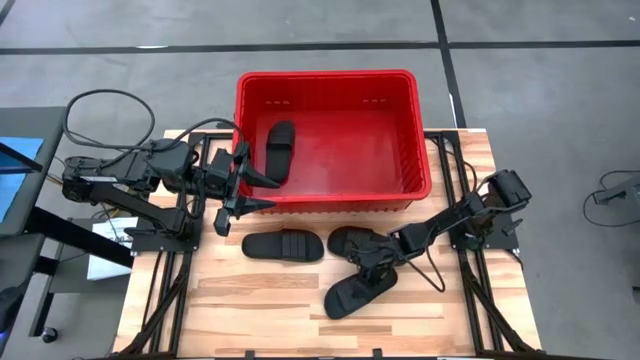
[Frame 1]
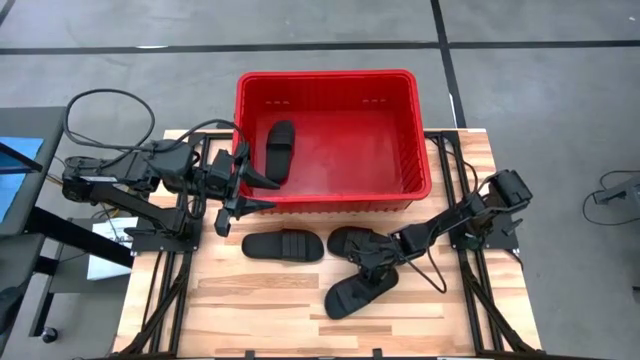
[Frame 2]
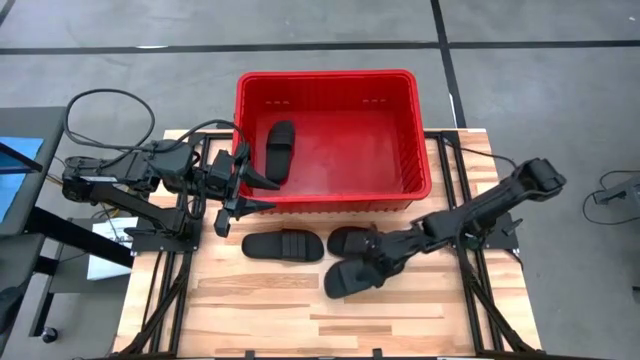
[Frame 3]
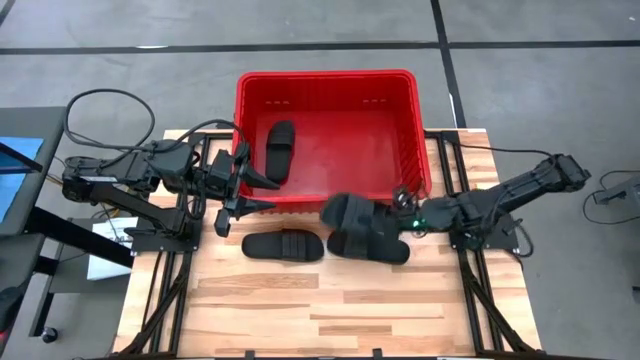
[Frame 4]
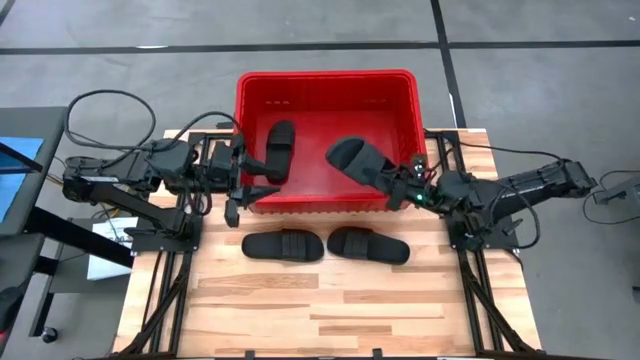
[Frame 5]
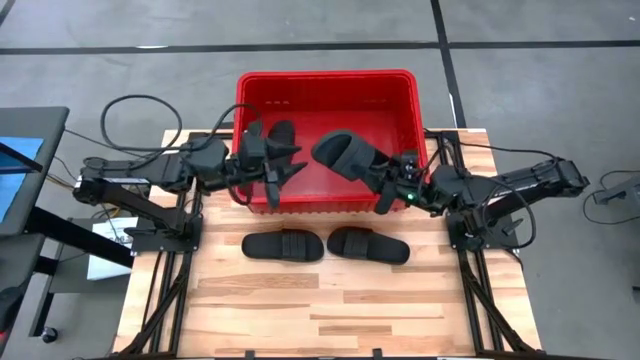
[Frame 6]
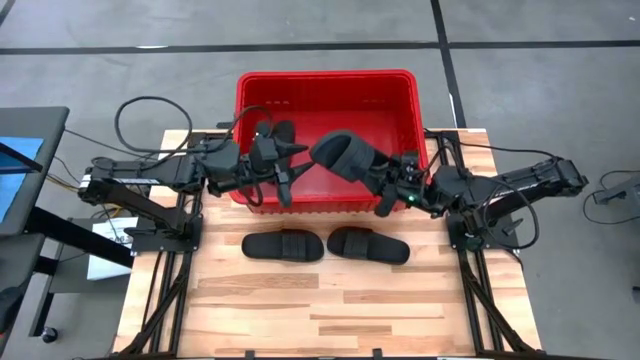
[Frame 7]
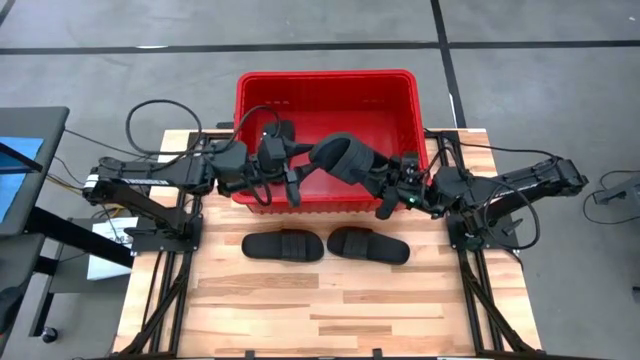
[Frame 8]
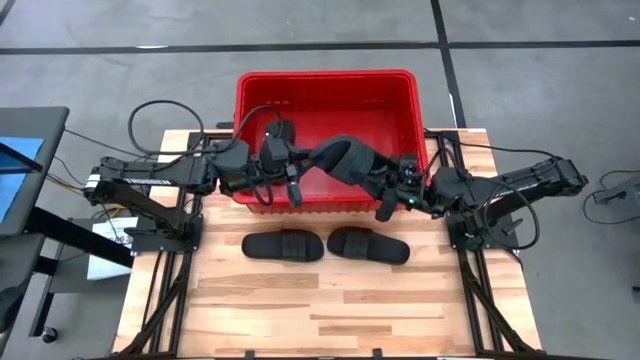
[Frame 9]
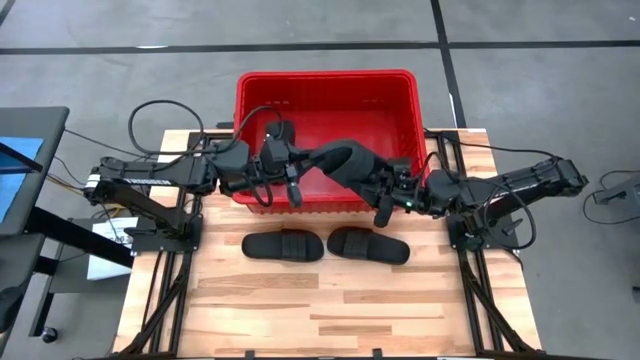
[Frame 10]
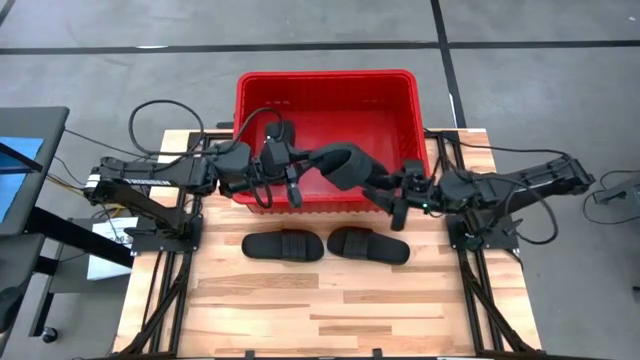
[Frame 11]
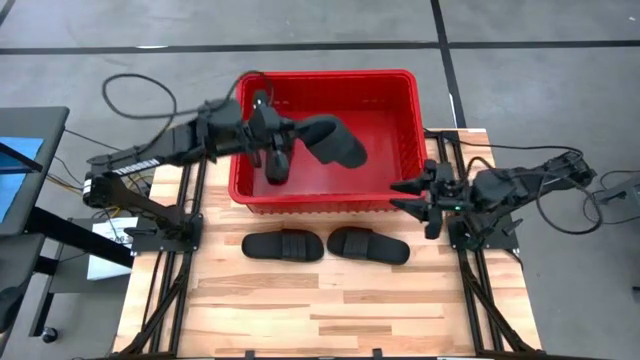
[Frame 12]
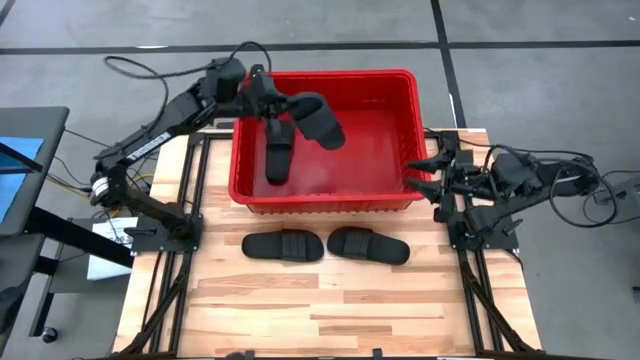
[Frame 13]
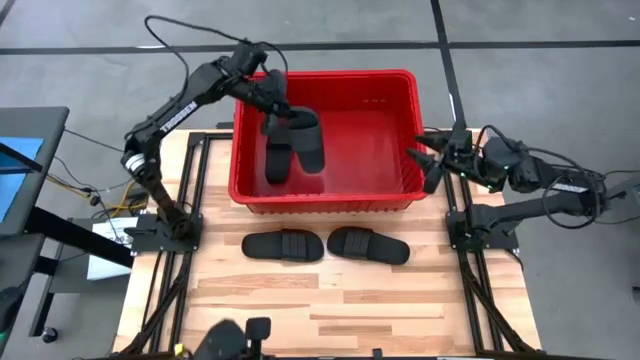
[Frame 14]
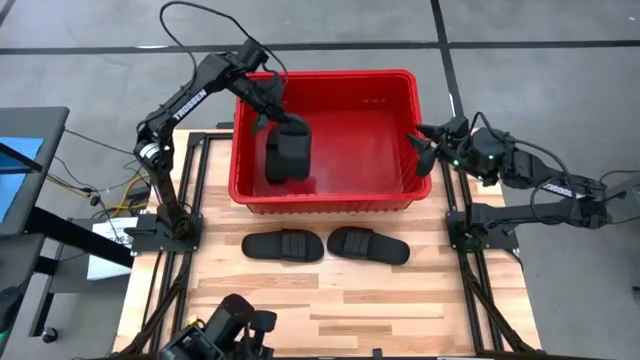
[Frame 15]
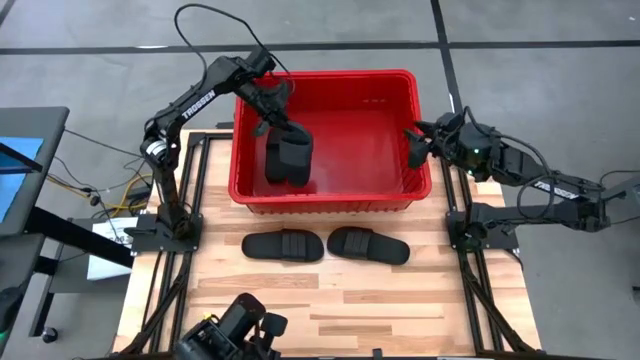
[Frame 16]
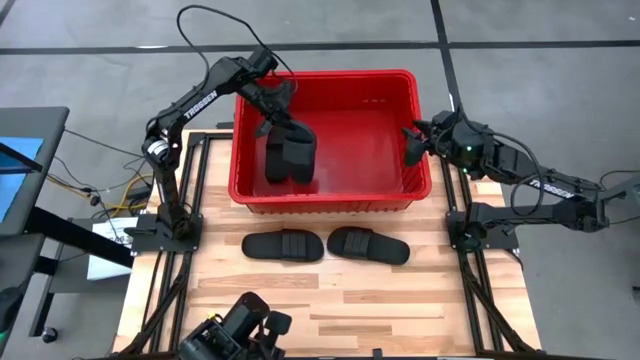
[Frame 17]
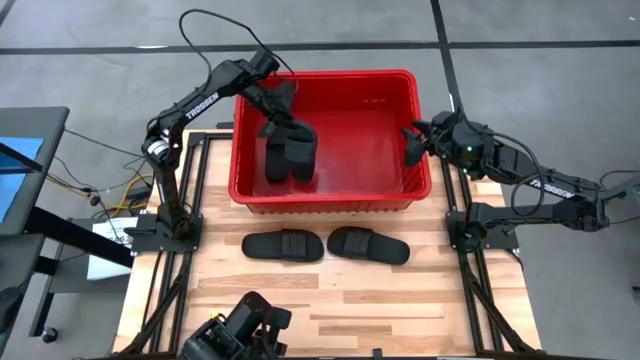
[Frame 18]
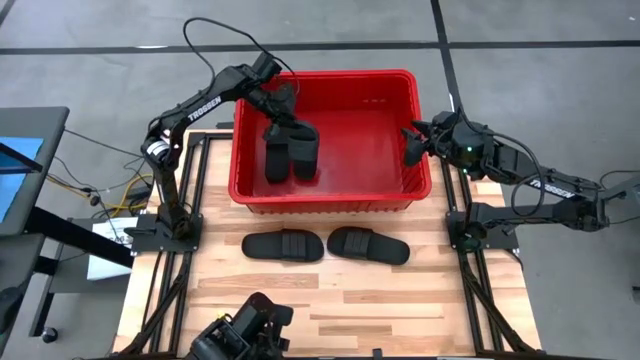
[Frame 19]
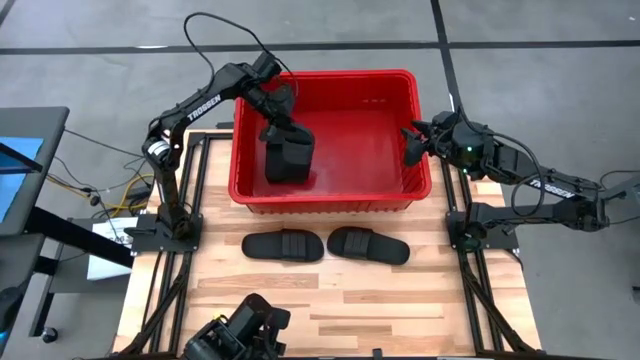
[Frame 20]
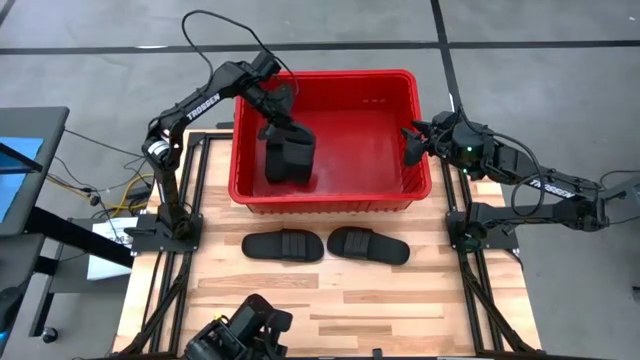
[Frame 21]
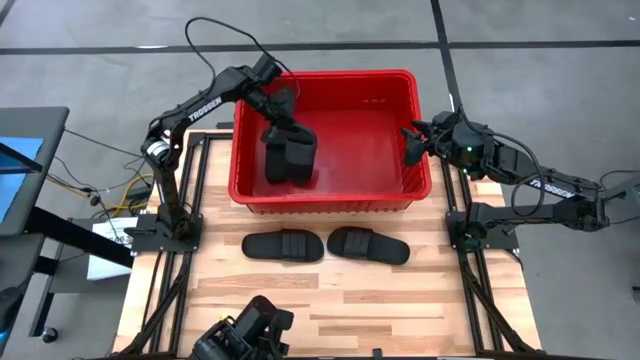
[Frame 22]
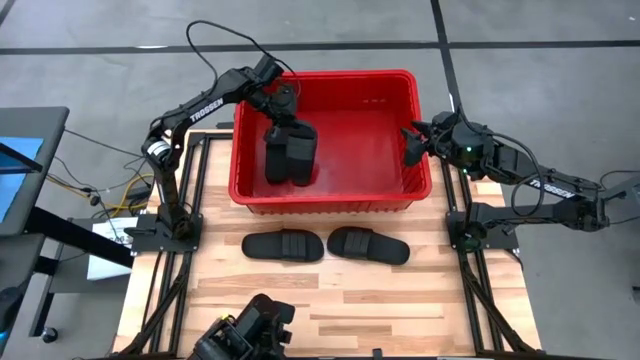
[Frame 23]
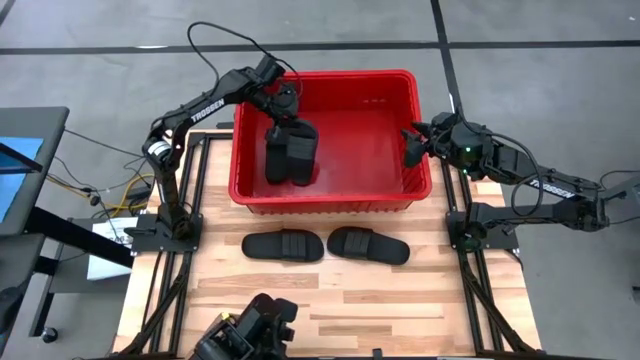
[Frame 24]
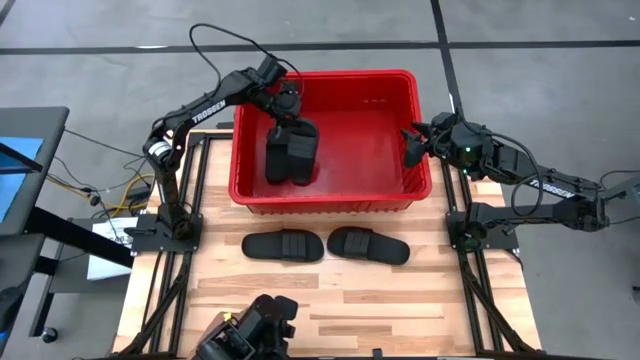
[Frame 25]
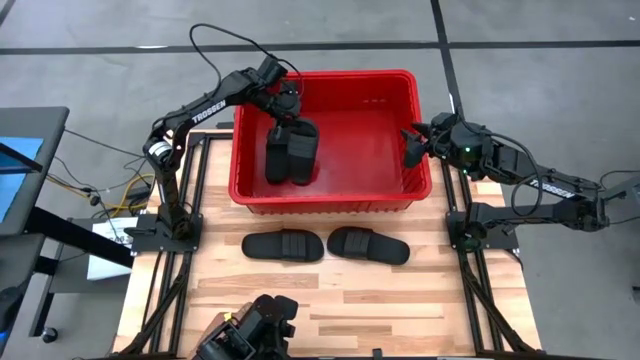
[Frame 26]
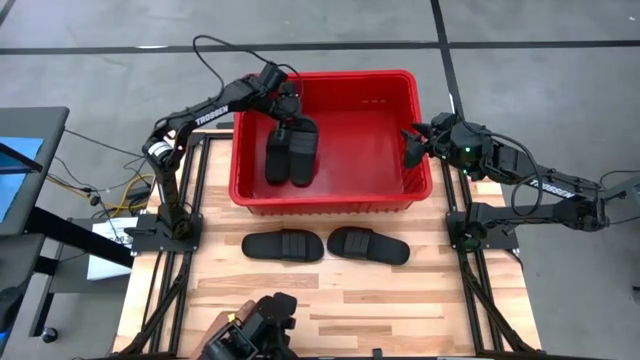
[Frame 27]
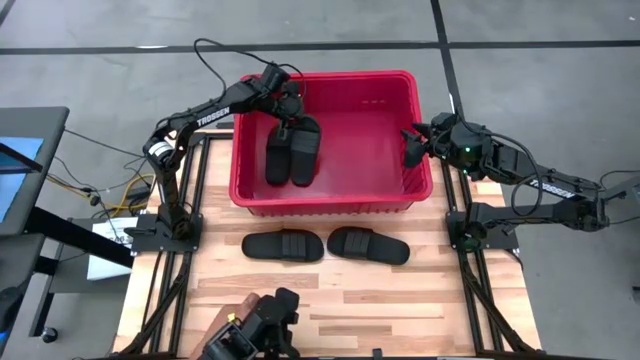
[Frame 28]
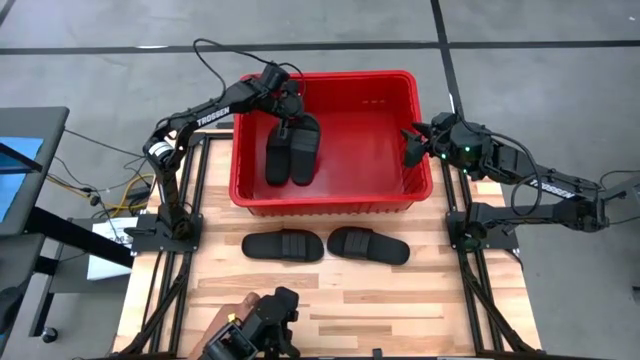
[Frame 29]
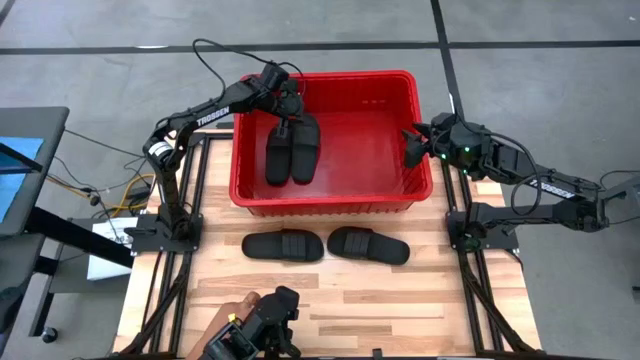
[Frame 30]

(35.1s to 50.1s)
Task: Pick and place slides into bin
Put the black slide into the red bin

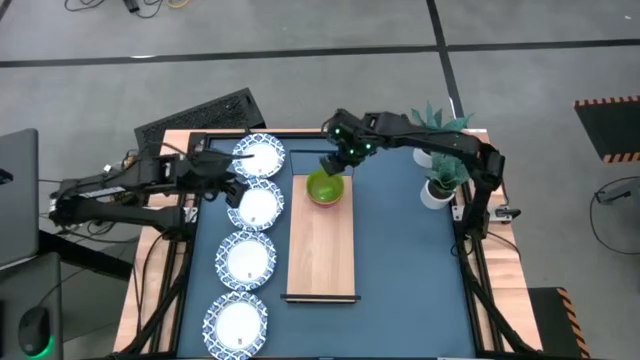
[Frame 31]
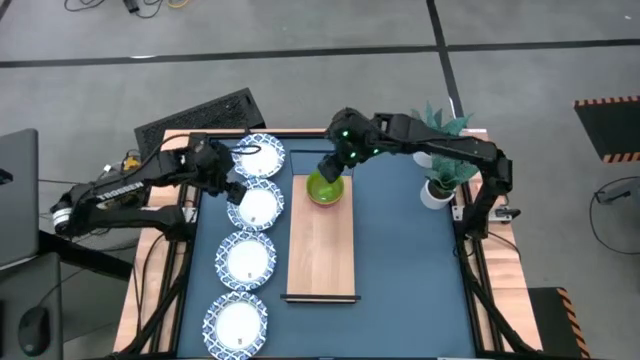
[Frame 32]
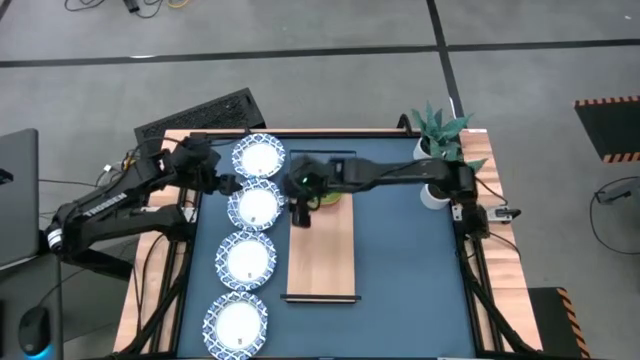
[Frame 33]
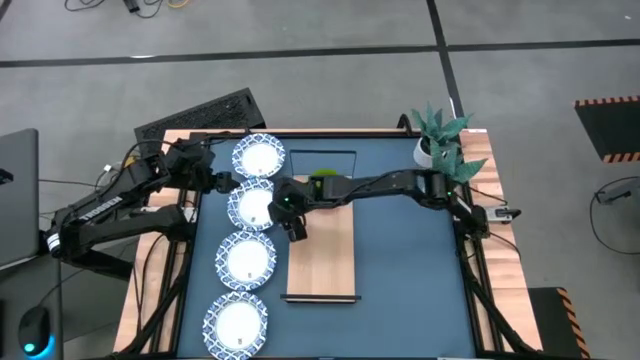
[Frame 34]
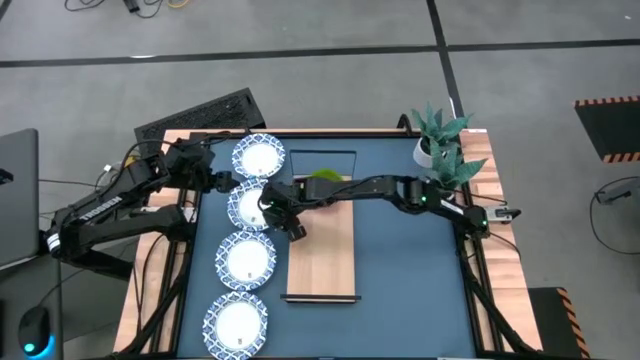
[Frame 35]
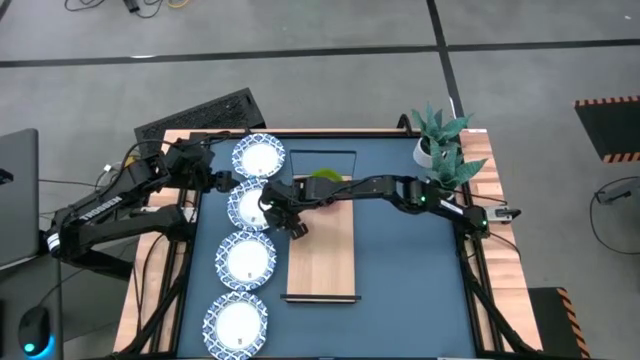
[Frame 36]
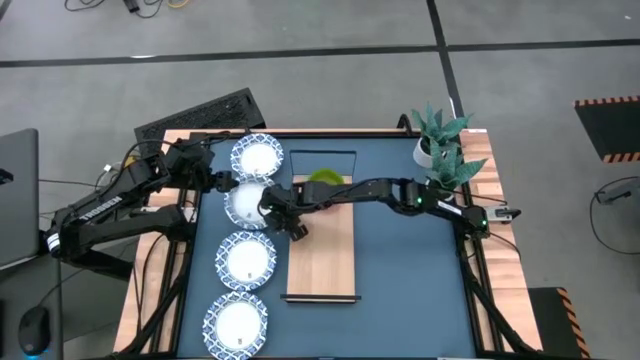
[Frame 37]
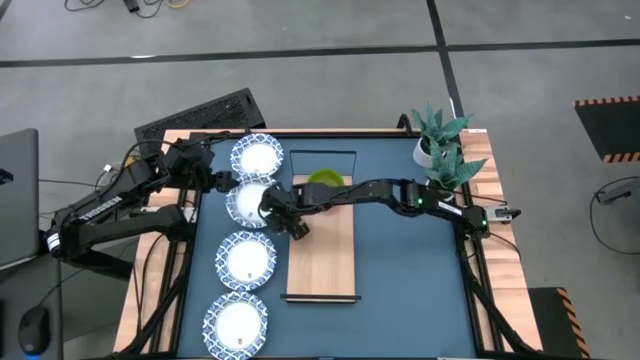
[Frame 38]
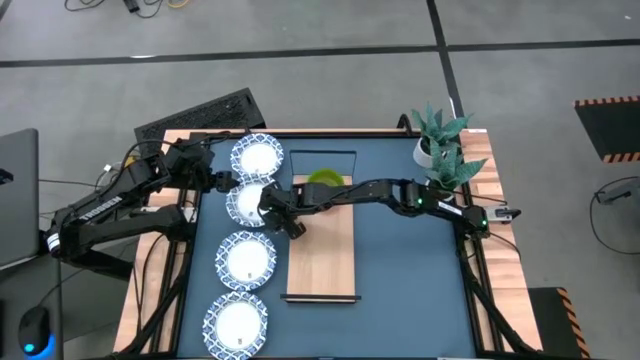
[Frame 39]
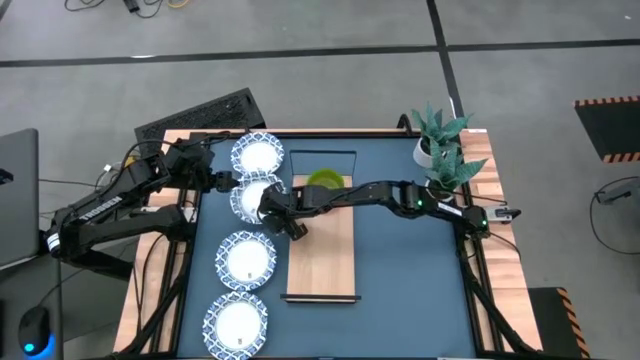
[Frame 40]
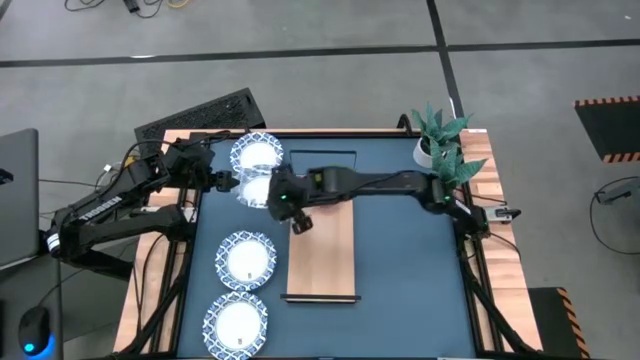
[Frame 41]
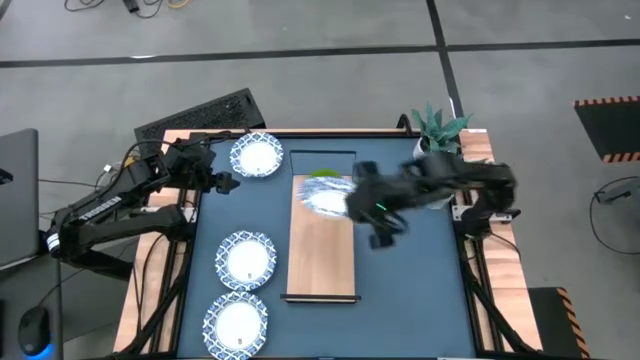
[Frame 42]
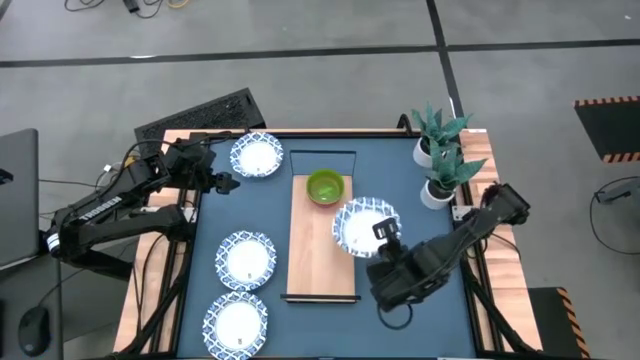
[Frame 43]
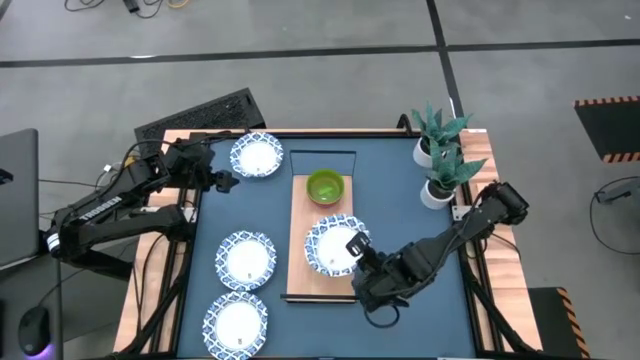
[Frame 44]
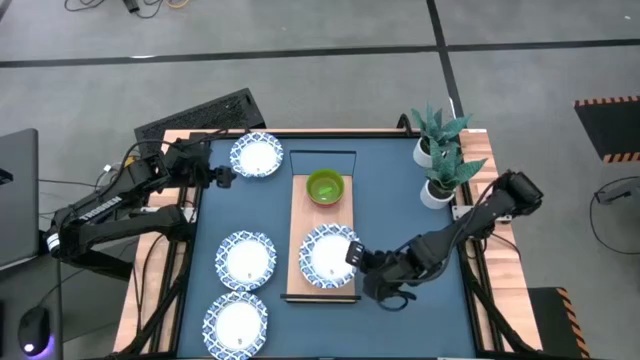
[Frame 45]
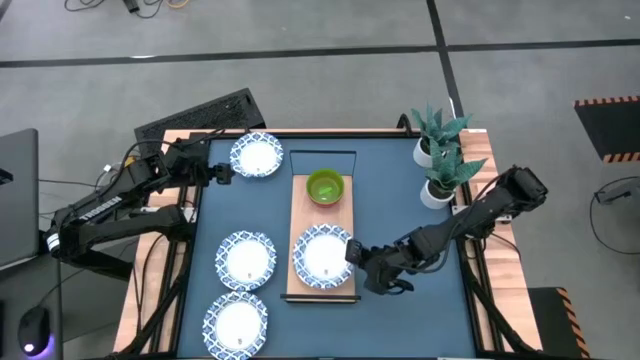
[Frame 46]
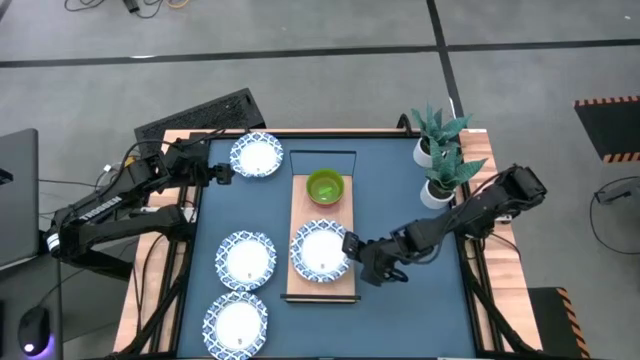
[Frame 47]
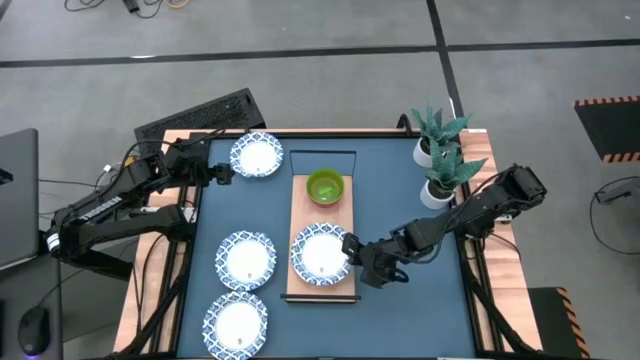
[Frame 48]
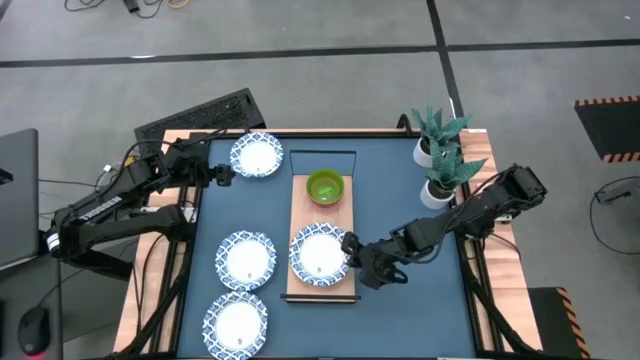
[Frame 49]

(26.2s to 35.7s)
Task: Place and stack bowls onto a shelf
Put the white patterned plate on the shelf
